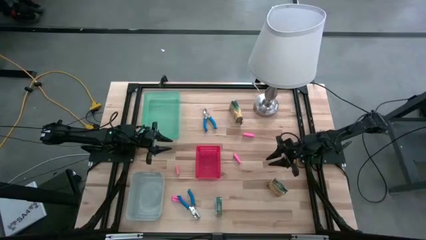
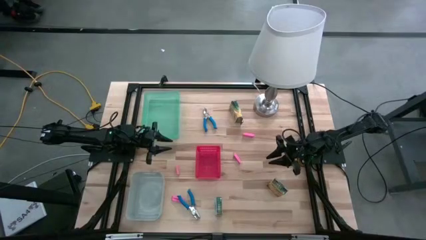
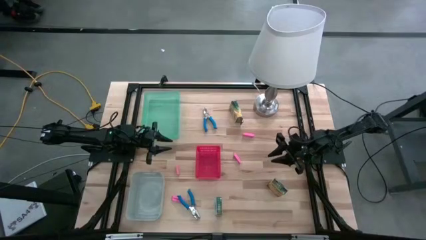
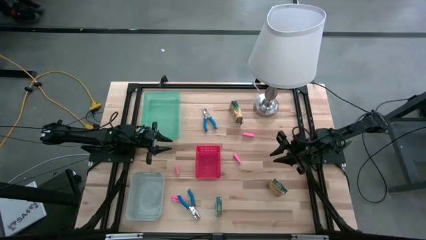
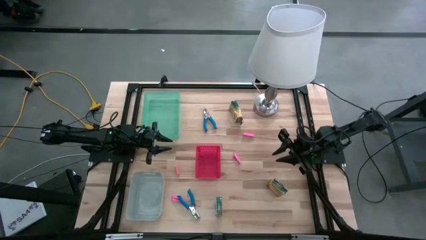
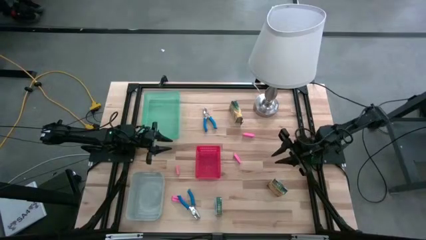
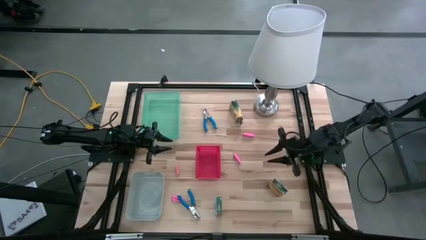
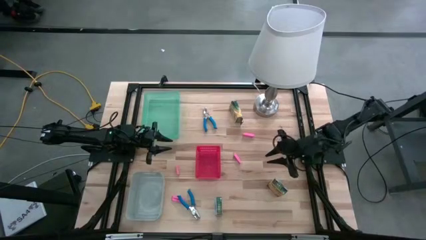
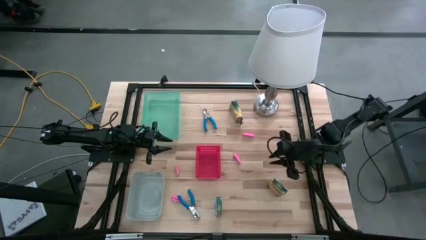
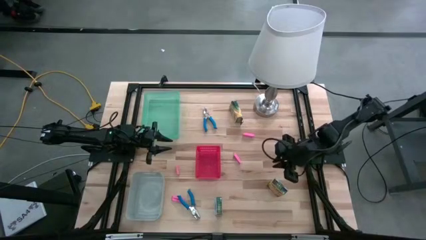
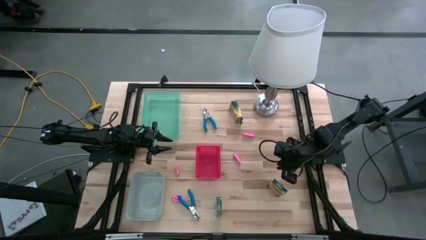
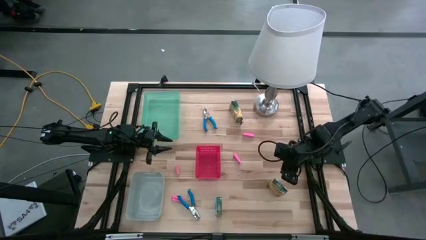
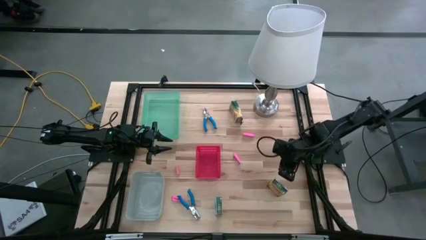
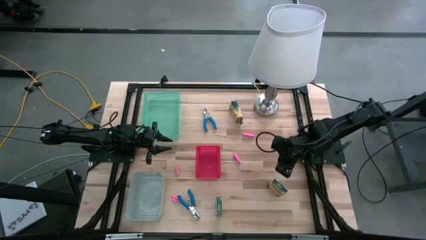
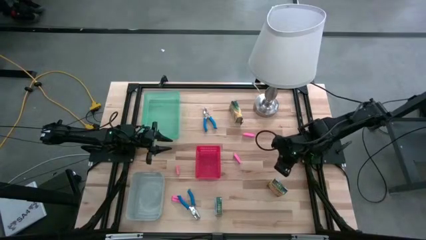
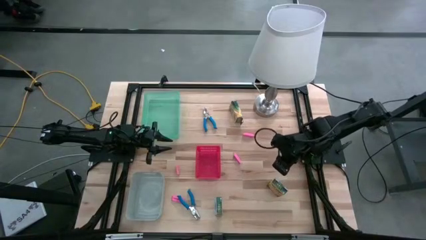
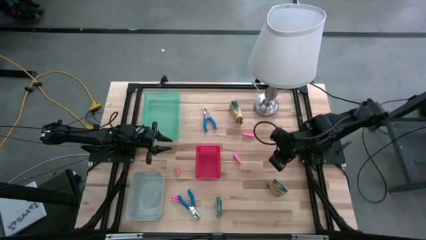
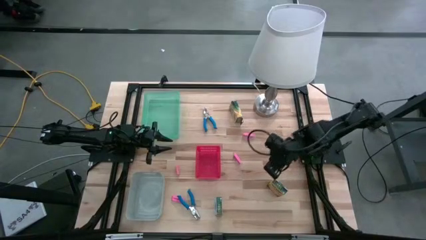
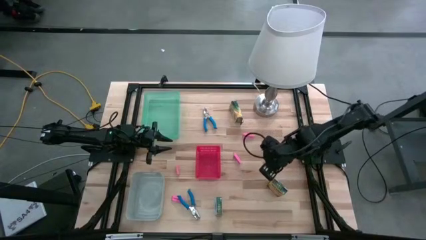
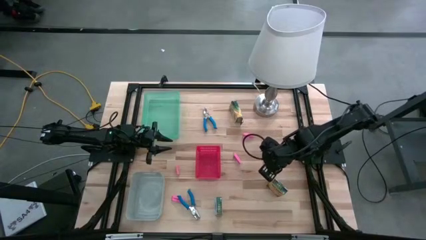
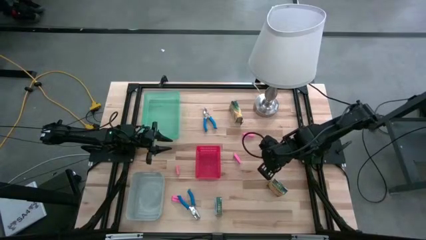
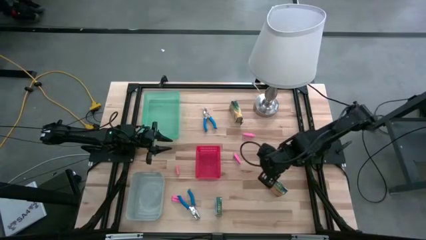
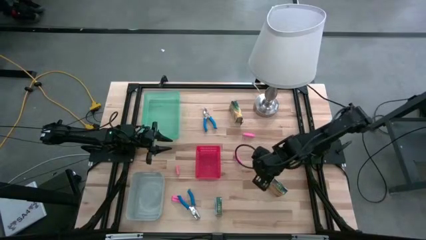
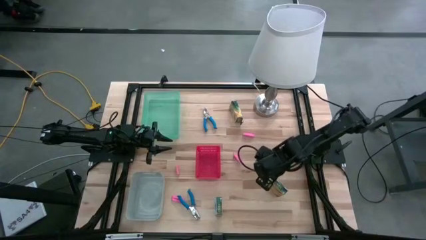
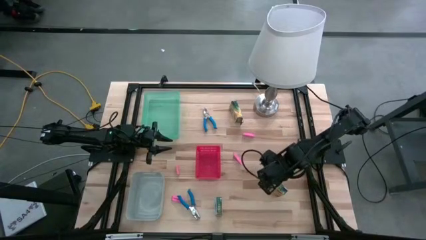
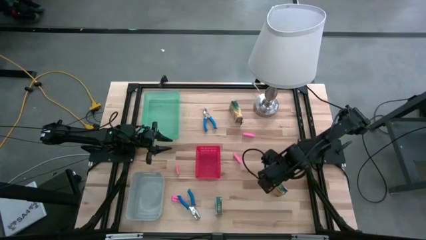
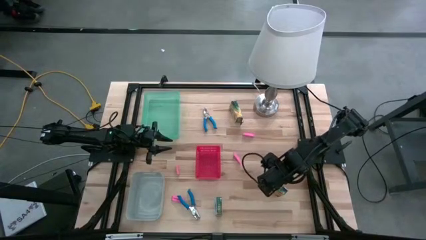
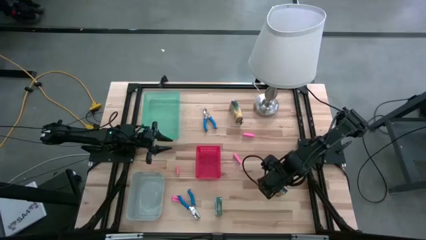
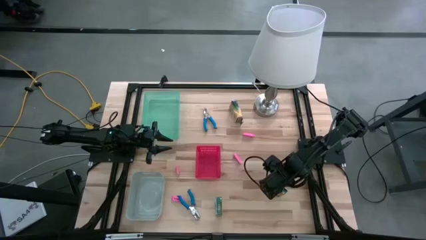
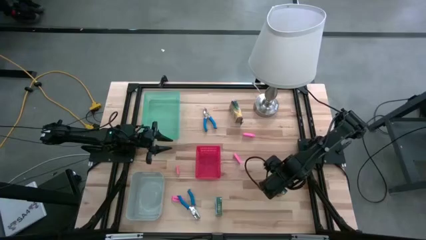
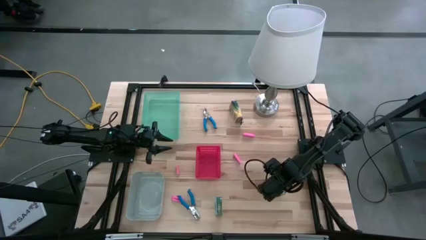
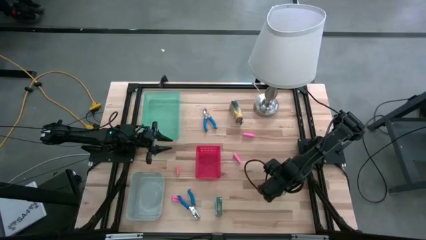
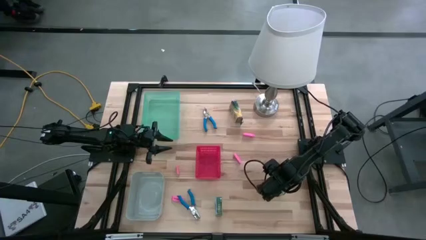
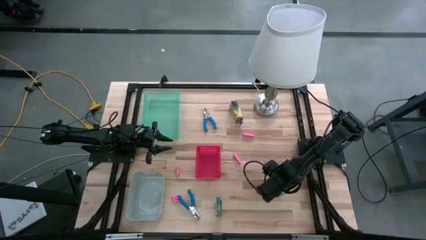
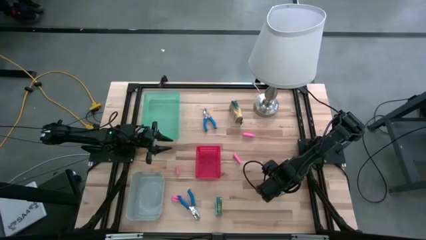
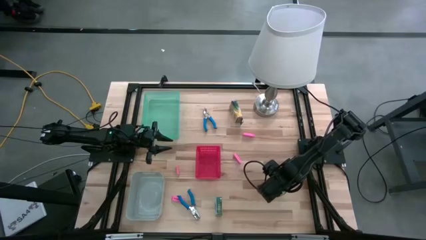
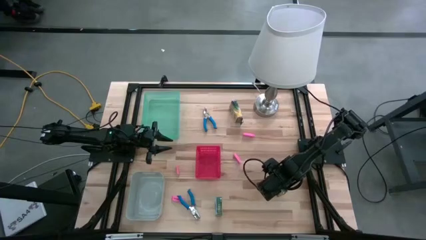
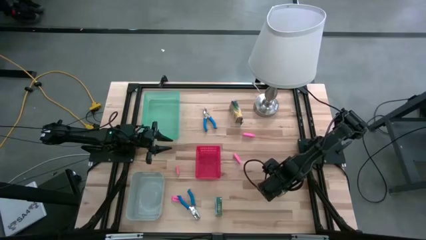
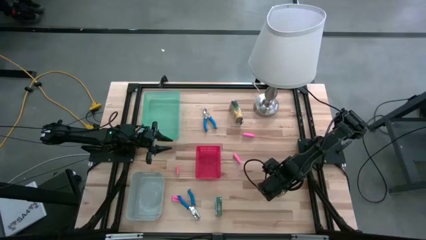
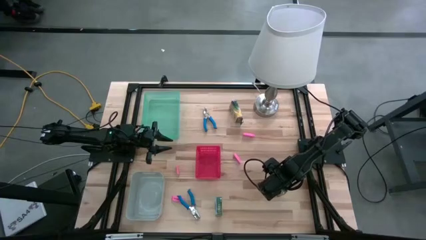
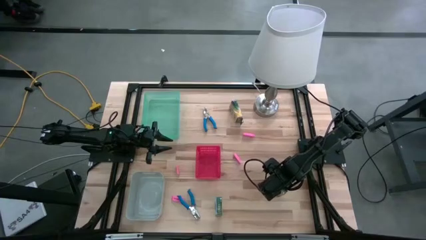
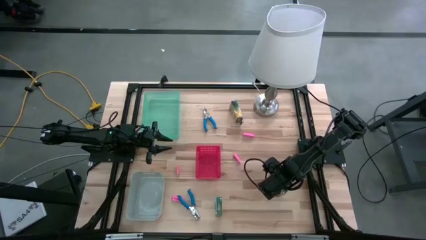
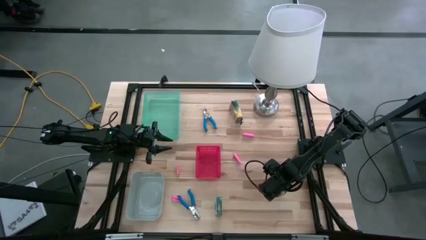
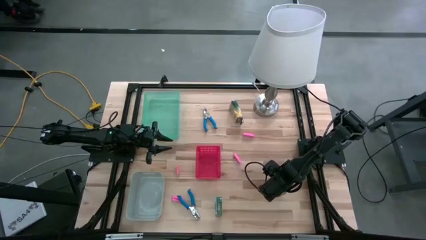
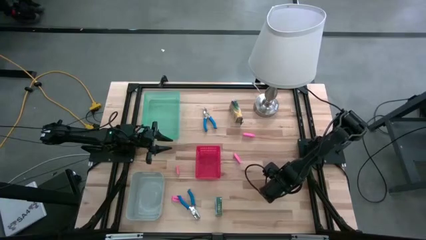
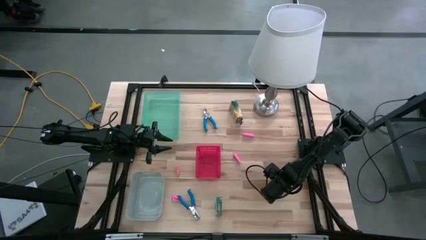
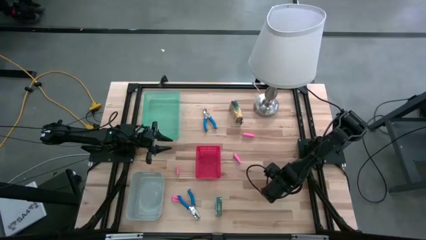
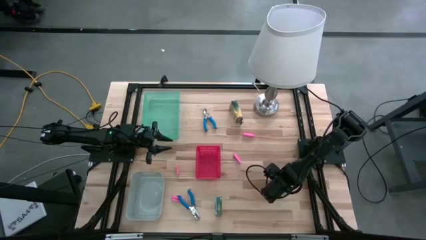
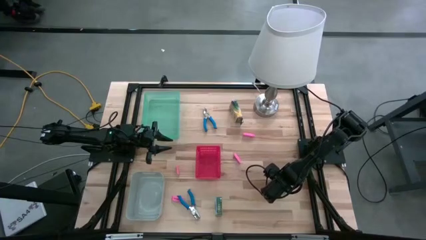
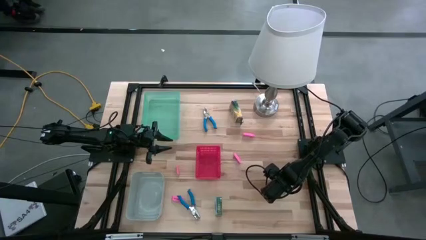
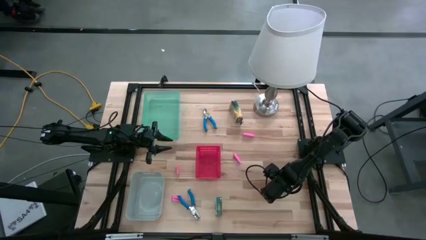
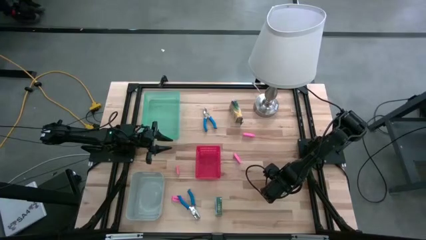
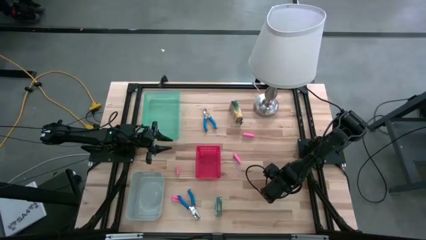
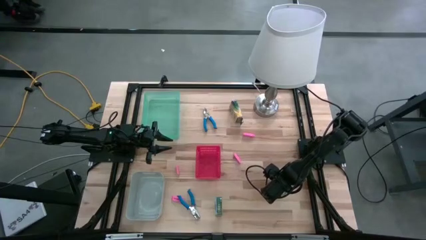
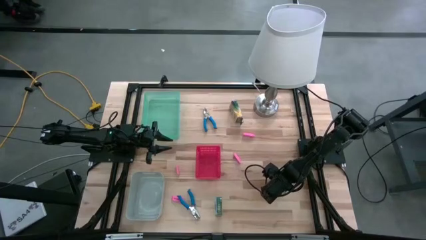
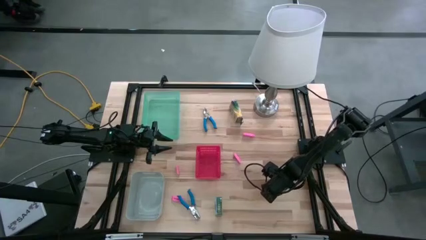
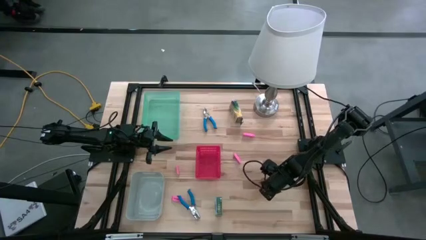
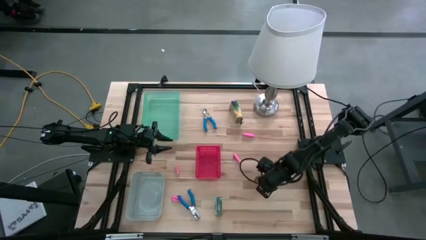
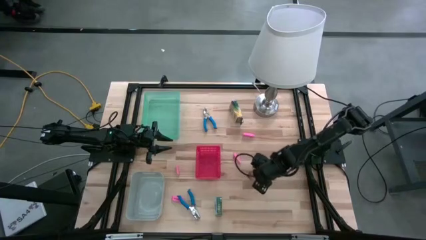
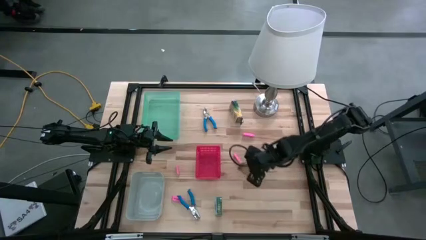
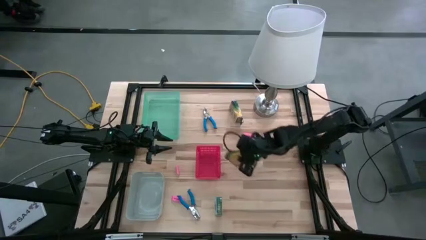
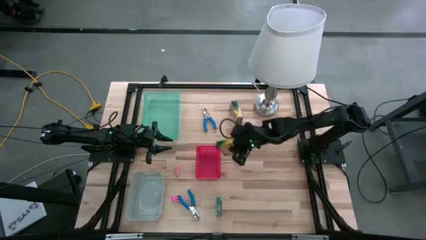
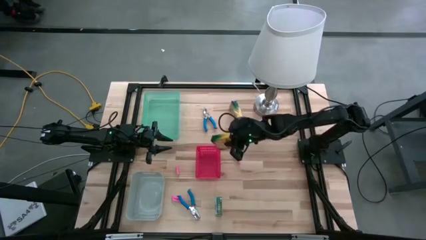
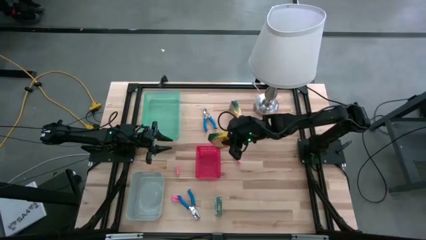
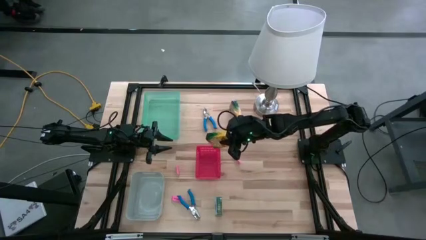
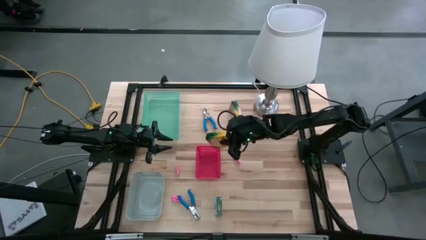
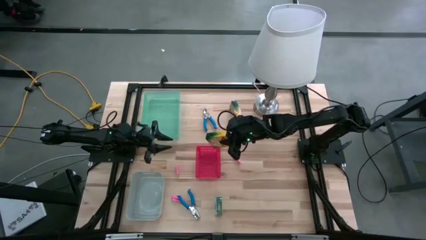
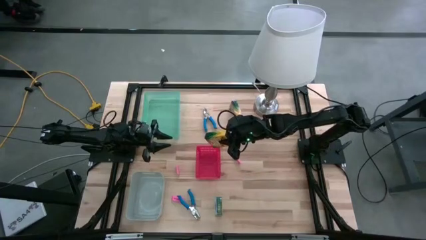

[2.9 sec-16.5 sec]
Task: Pick & Place School Supplies
Put the middle right yellow crayon box into the green bin

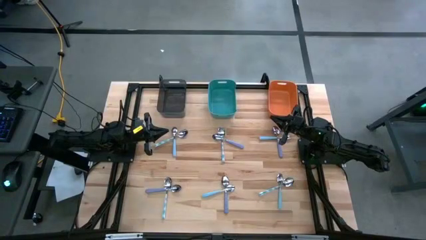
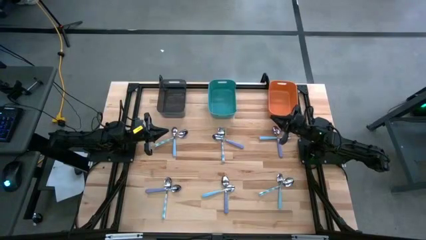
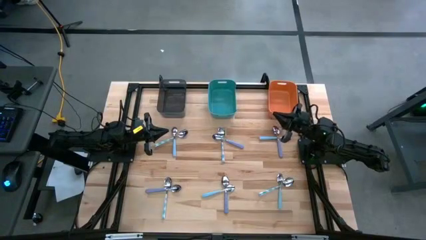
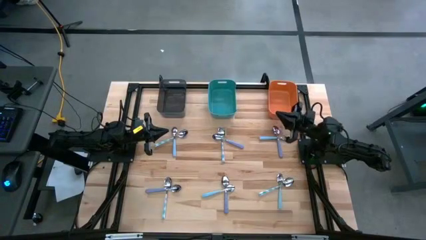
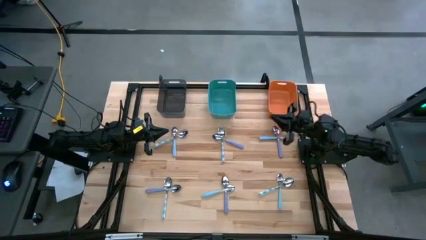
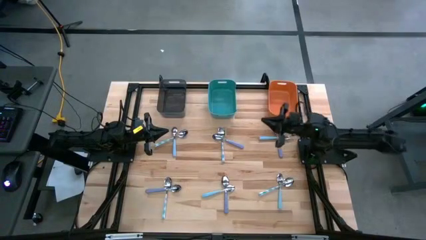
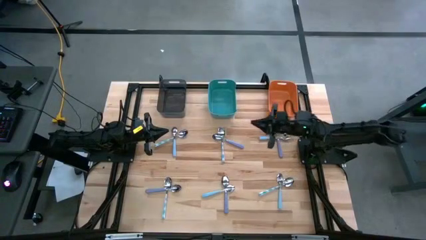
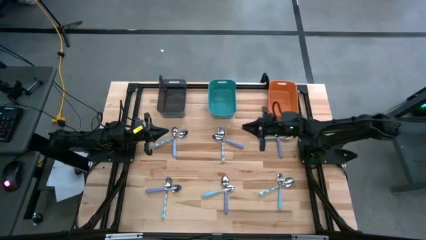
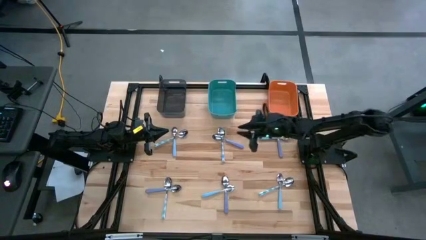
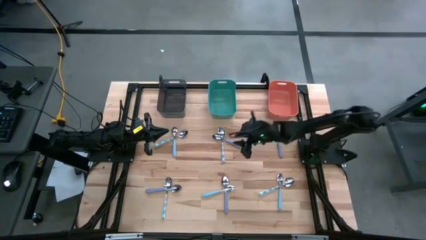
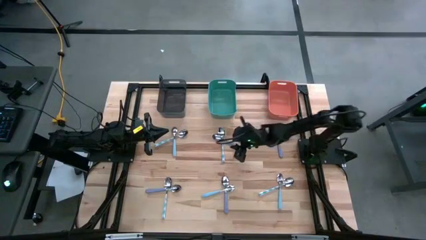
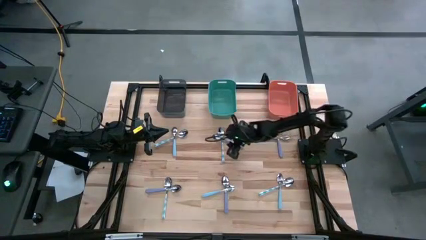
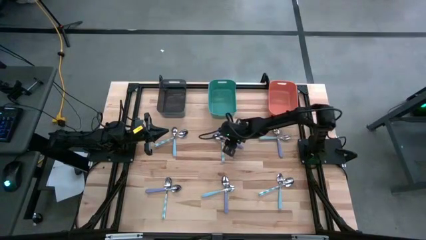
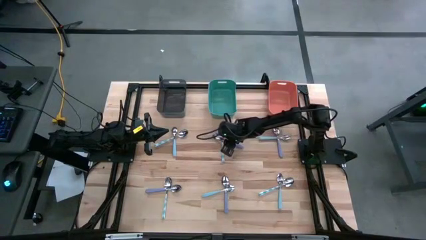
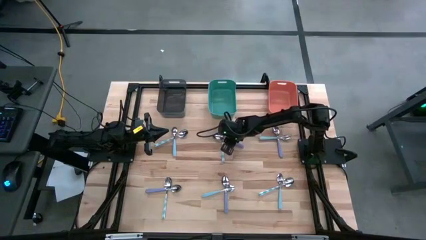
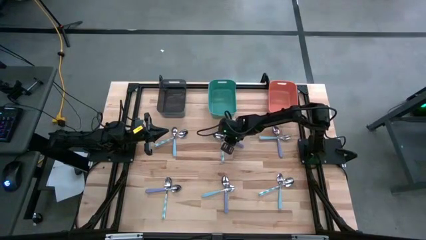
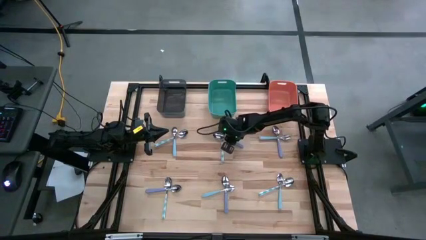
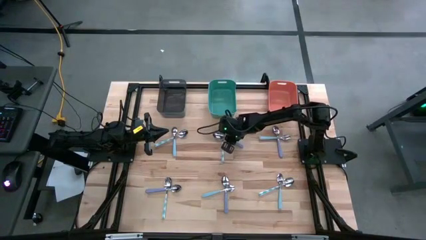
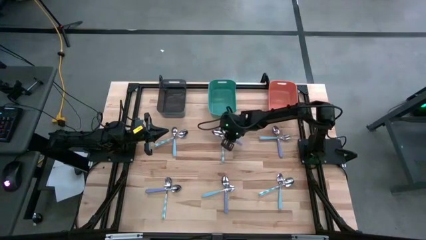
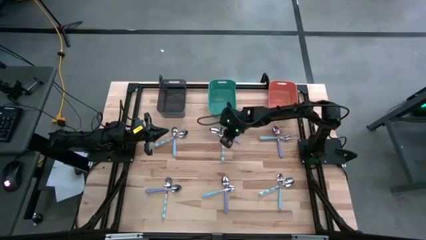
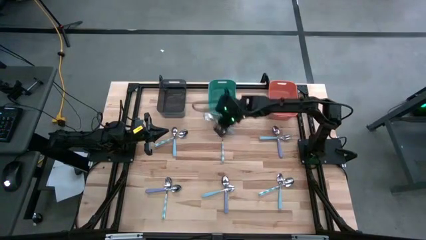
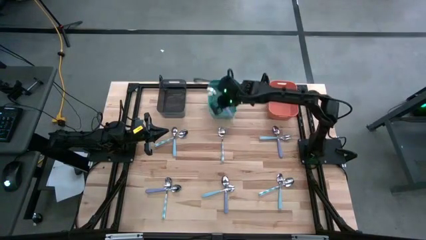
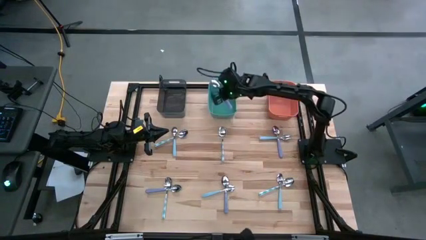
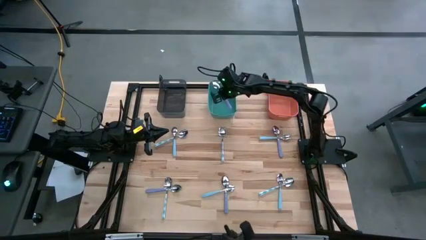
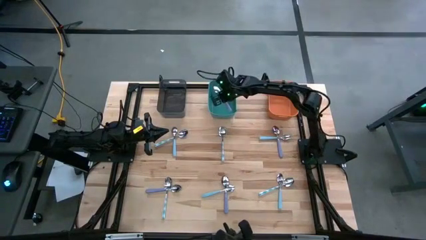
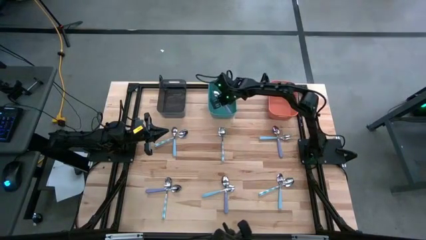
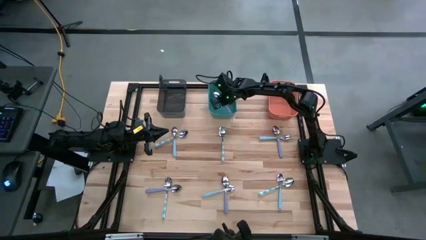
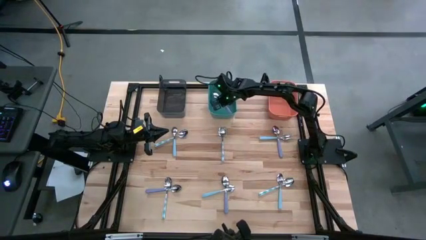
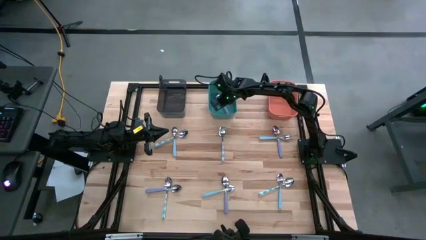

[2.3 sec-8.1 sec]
Task: Sort silverware by color (type)
Put the top left purple spoon into the green bin
